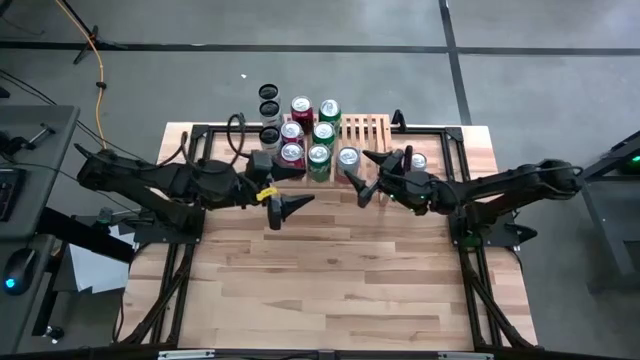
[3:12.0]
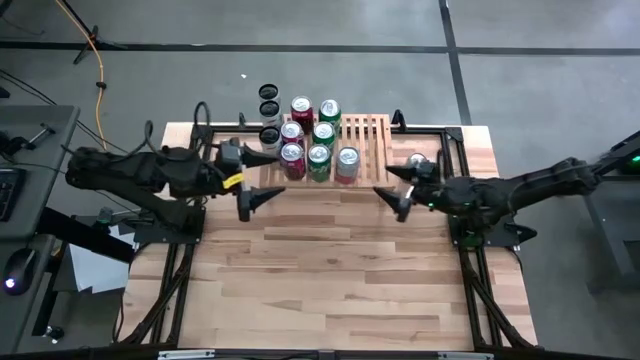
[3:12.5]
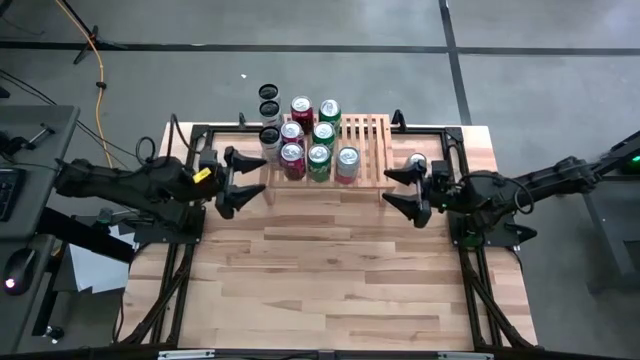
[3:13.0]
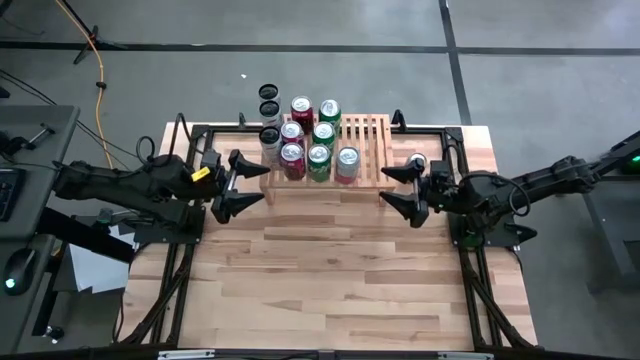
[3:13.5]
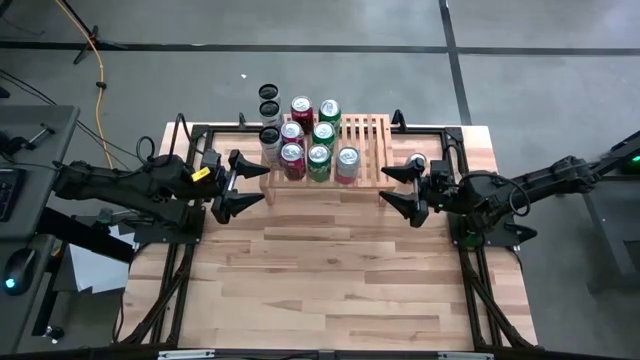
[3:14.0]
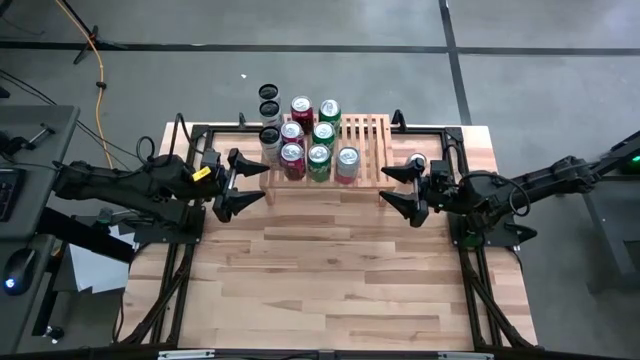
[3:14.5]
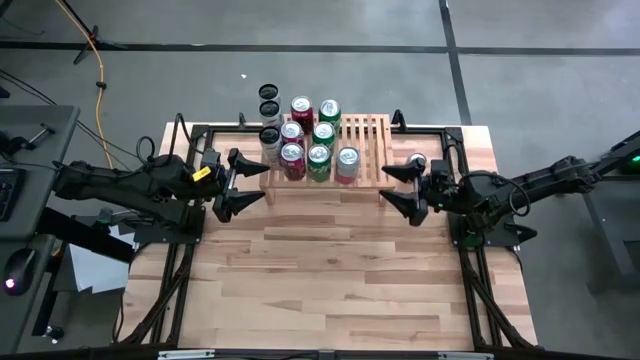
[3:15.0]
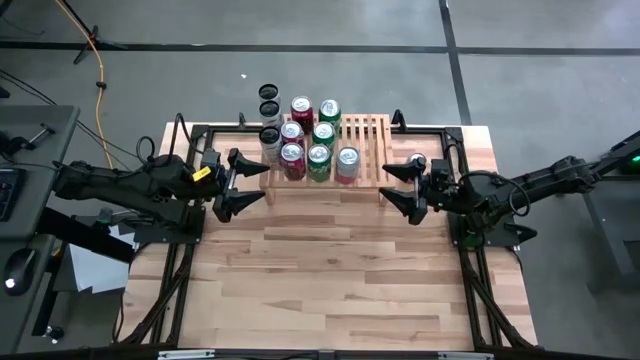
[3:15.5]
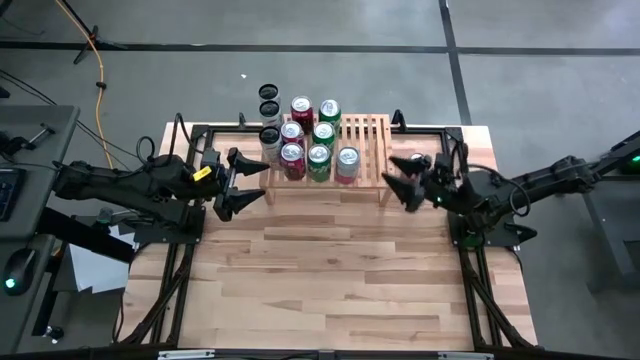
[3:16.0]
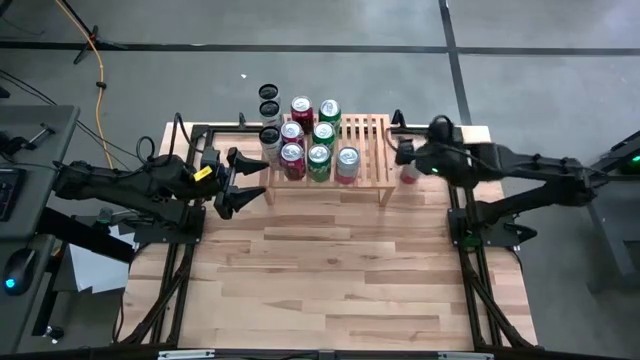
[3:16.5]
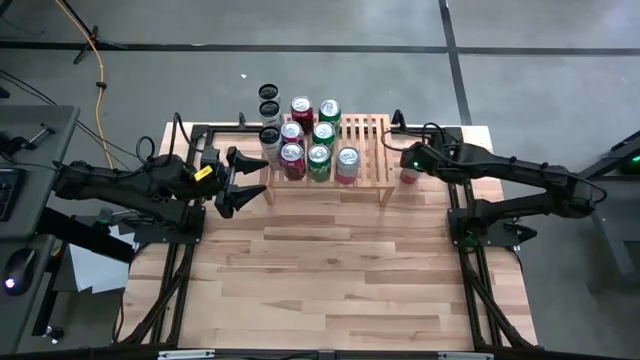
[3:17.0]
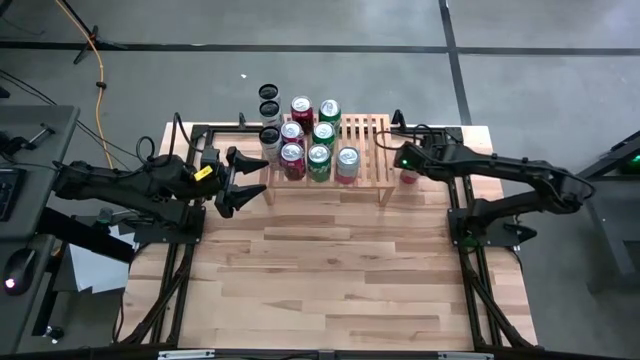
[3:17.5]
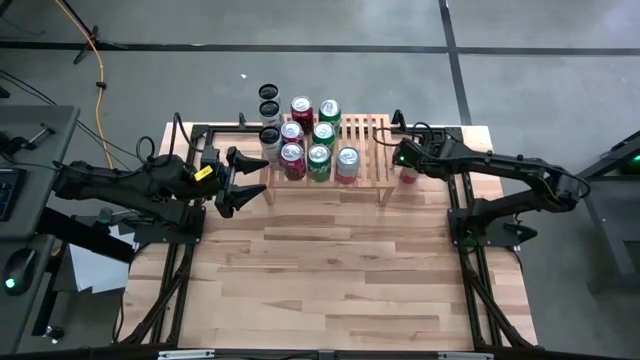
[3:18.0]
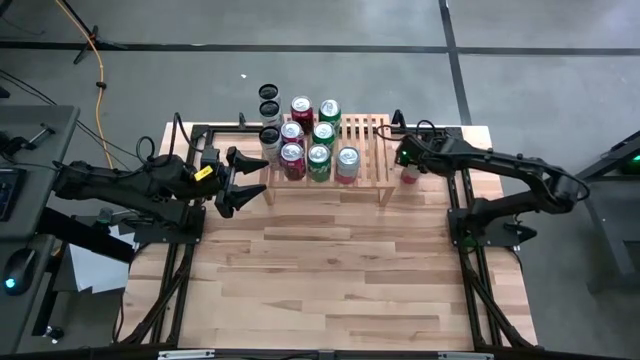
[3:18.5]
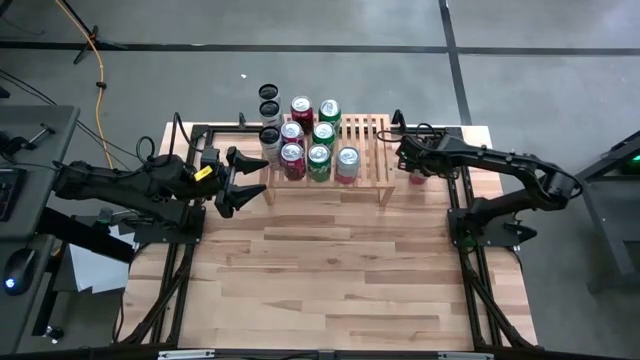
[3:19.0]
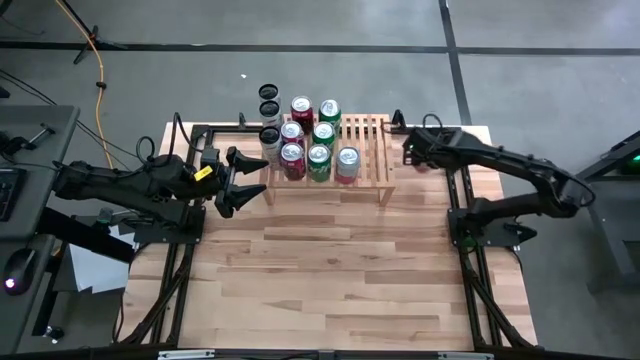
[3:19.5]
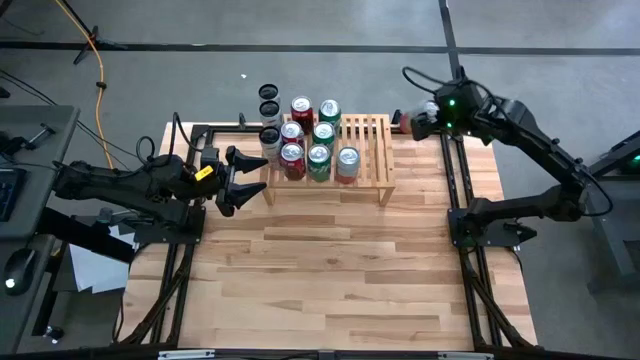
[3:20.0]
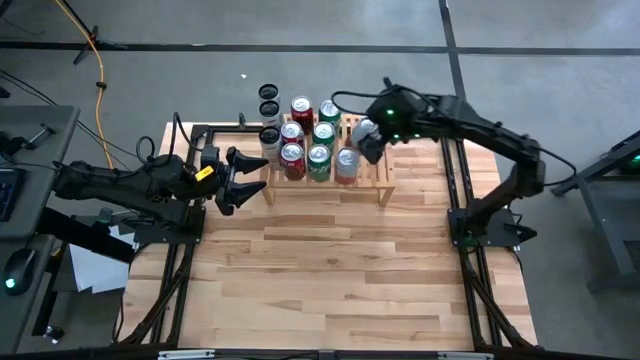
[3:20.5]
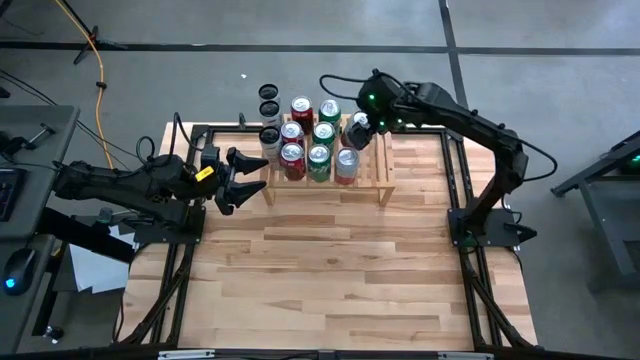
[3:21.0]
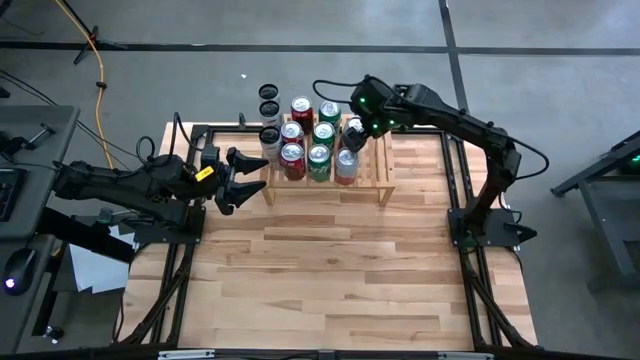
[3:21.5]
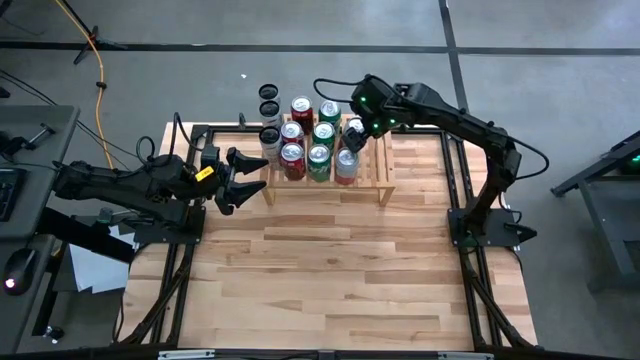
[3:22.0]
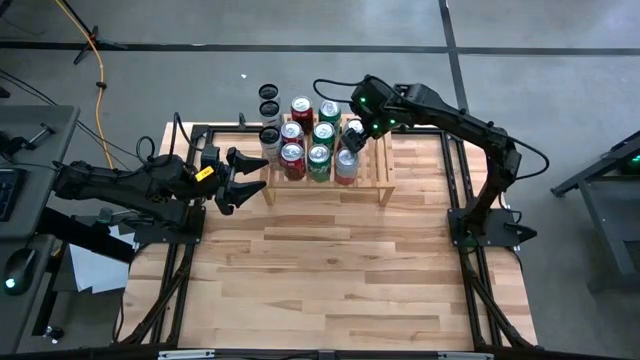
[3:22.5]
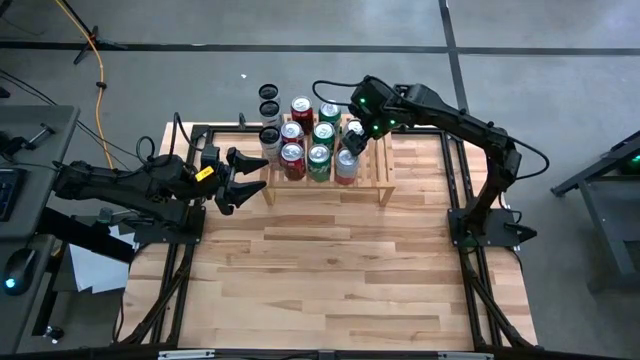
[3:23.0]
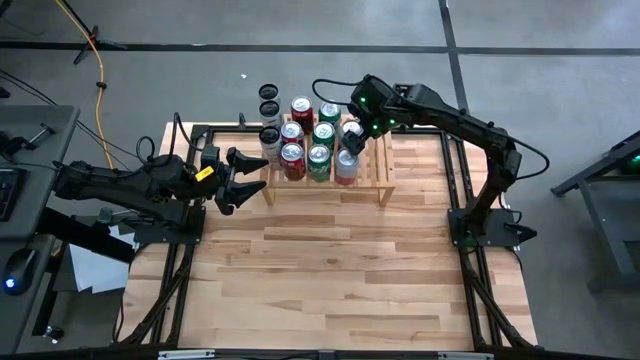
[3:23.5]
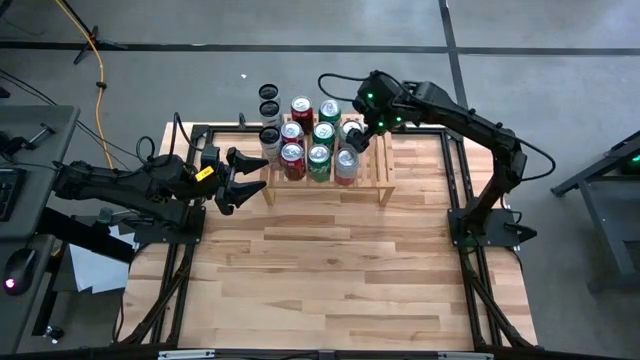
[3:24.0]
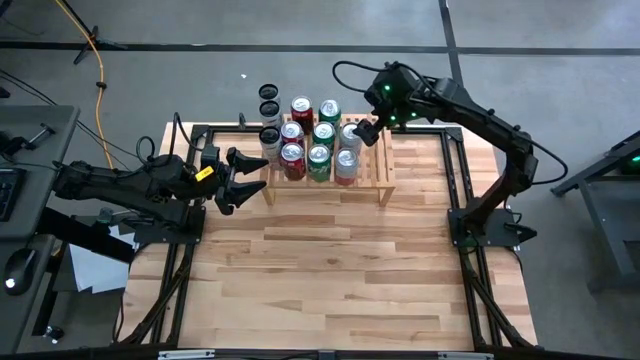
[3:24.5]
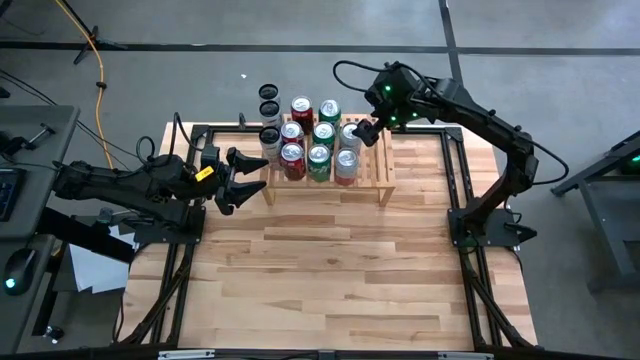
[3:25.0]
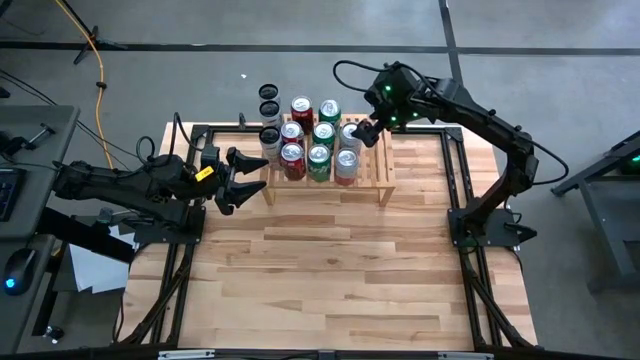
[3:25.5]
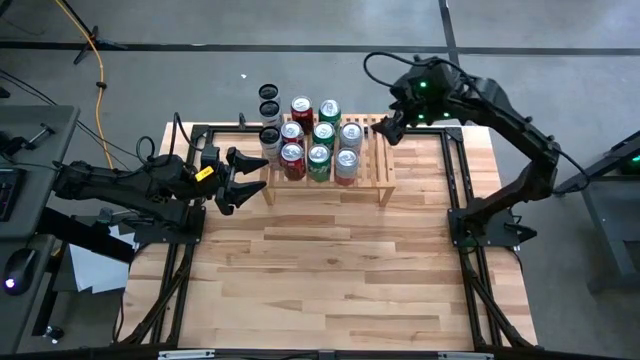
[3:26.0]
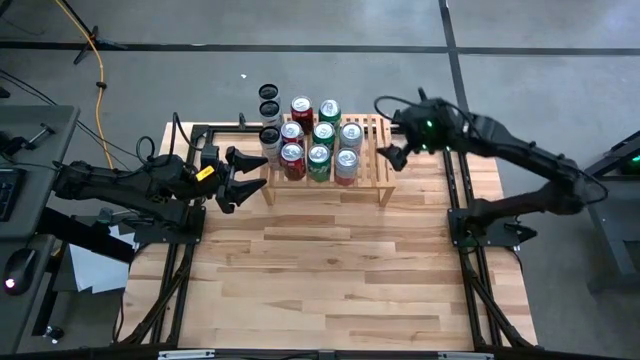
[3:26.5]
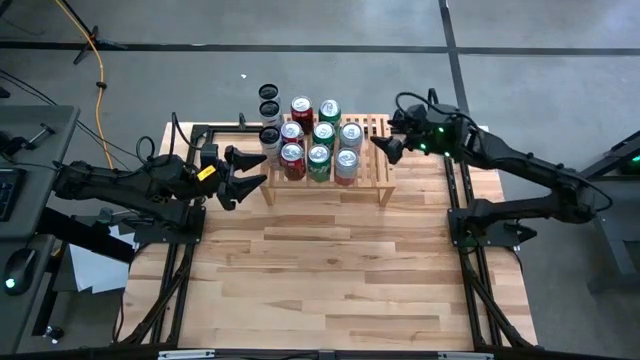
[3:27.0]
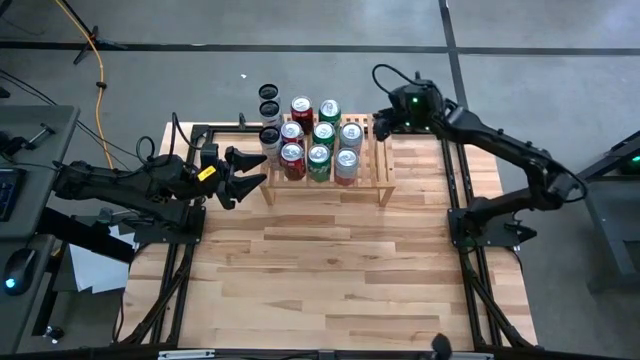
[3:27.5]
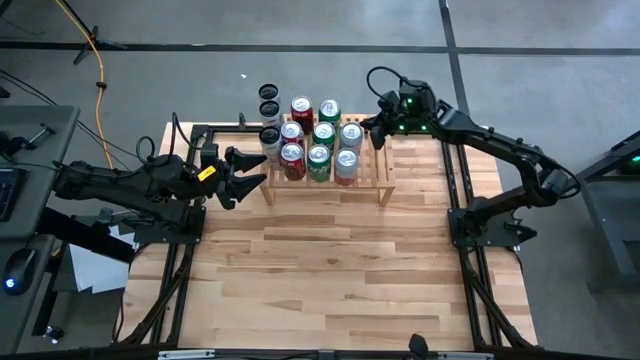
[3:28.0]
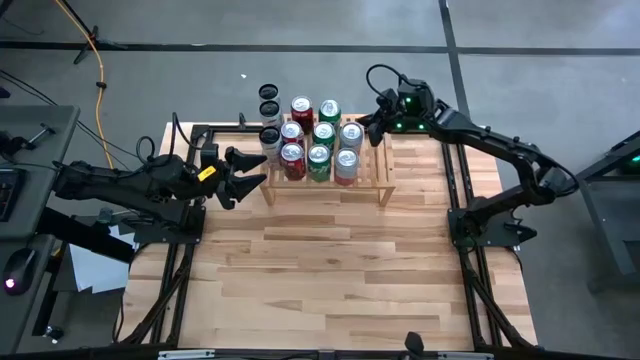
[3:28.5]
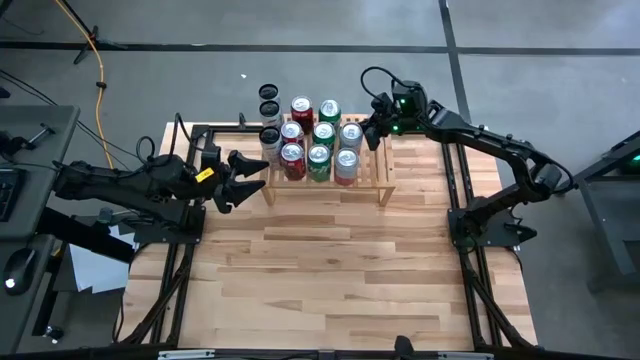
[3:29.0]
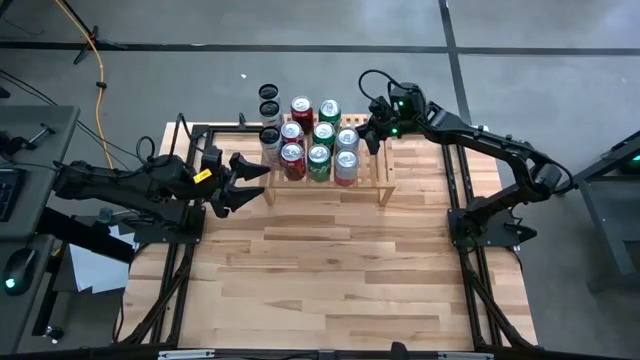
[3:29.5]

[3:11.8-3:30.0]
Task: Place canned beverage on shelf
Put the pink-white soda can on the shelf aligned with the other pink-white soda can

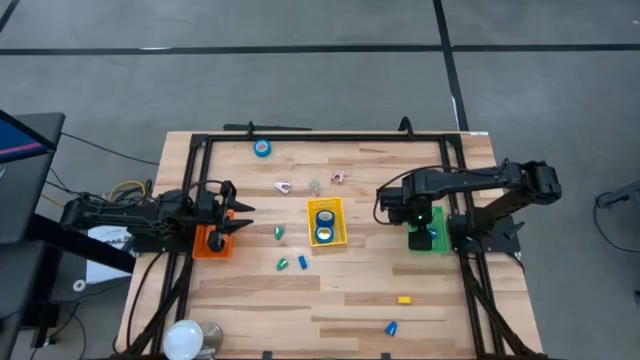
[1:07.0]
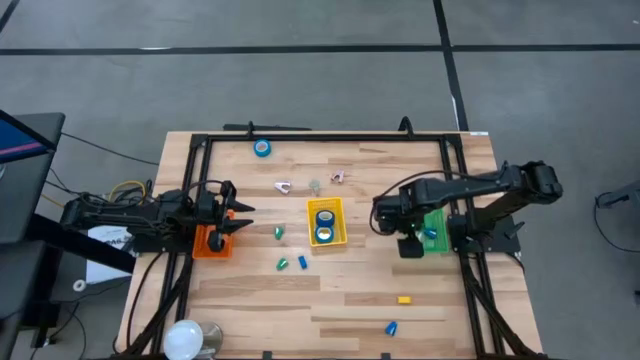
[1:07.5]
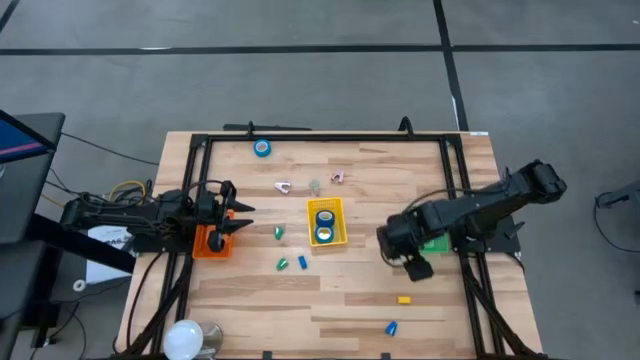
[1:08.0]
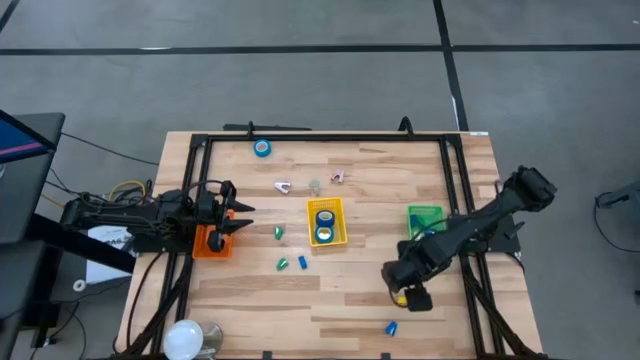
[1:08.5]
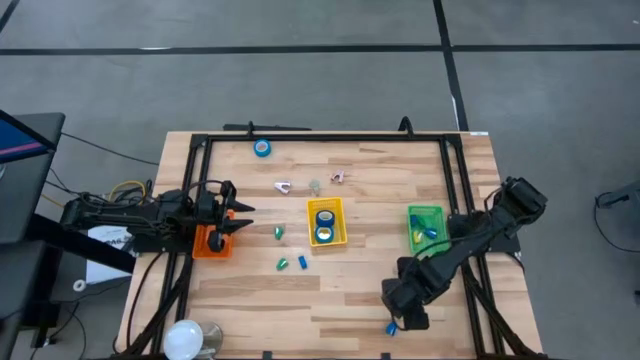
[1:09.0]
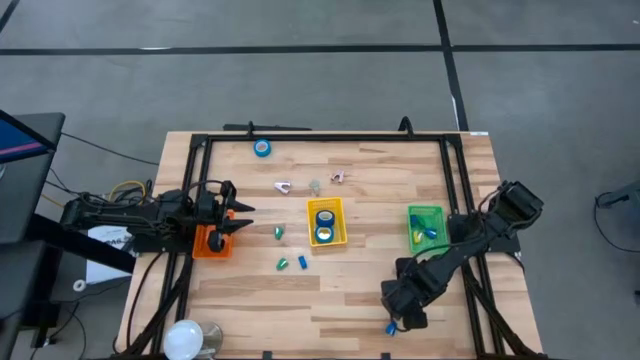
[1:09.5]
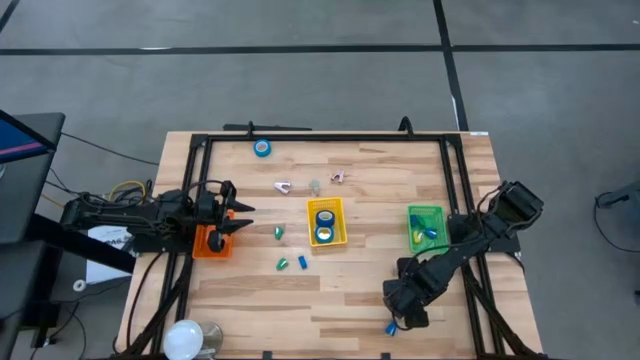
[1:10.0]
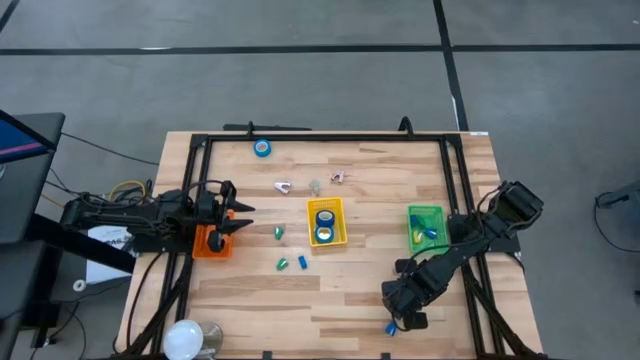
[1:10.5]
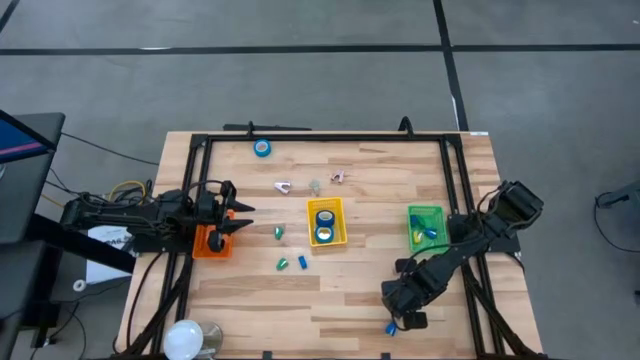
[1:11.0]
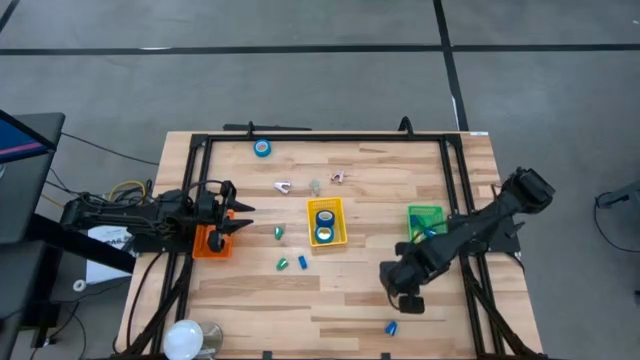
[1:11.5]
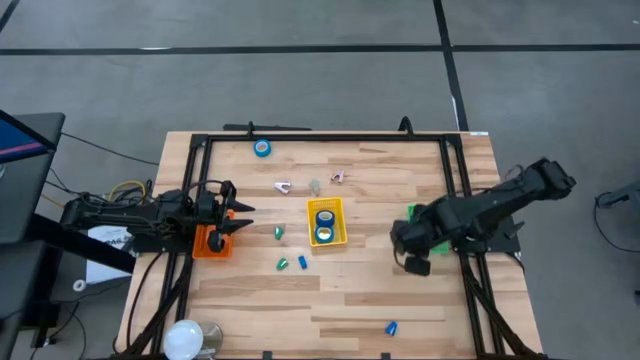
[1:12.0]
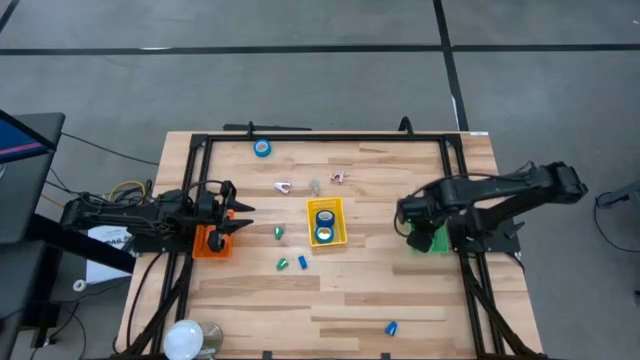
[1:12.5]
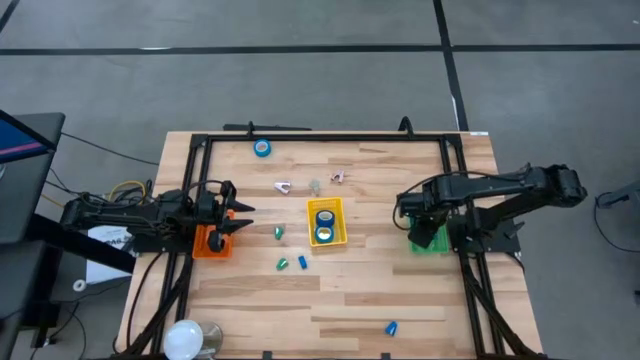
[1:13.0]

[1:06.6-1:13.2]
Task: Pick and place Stapler, Stapler remover, tape
Put the yellow stapler into the green basket
